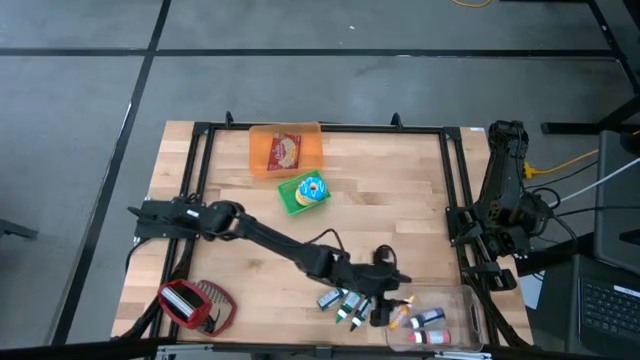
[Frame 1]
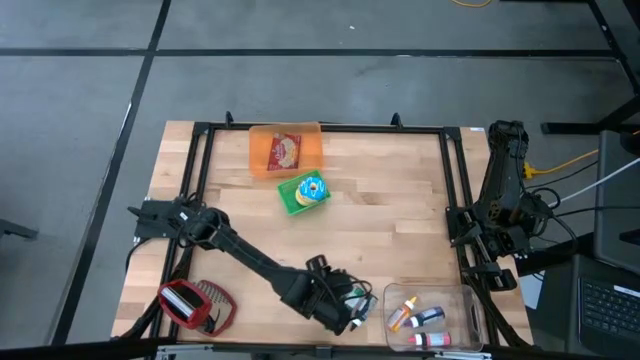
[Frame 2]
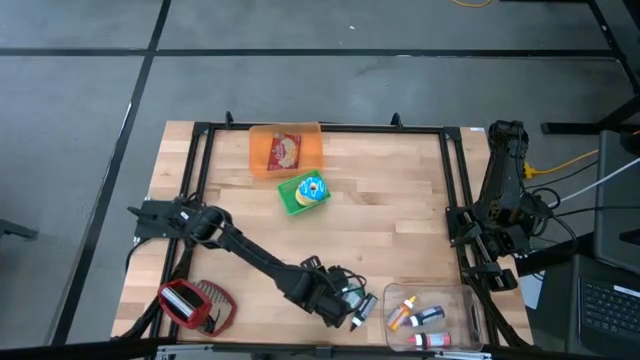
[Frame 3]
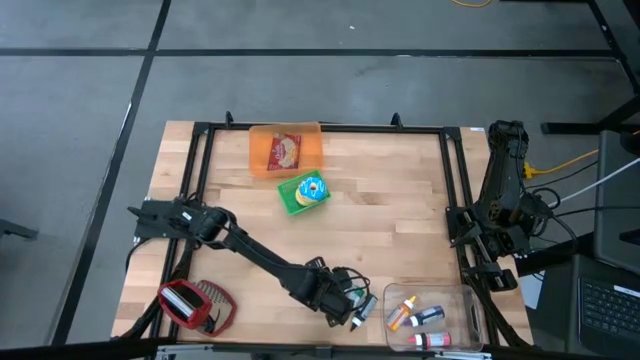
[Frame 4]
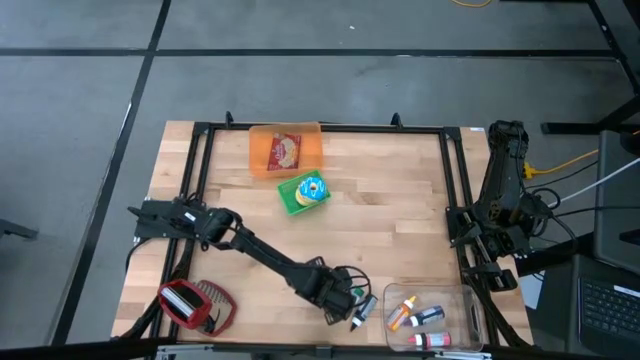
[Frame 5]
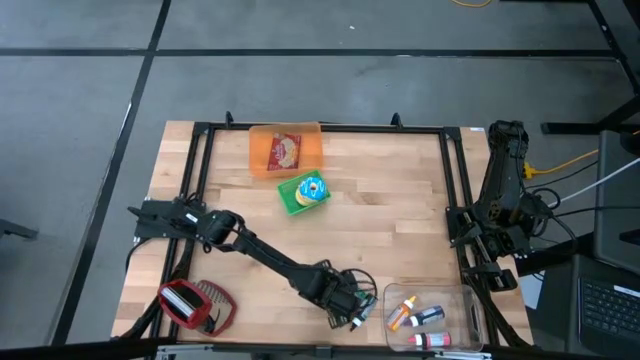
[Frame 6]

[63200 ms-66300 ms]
Put the left green food coloring into the transparent bin

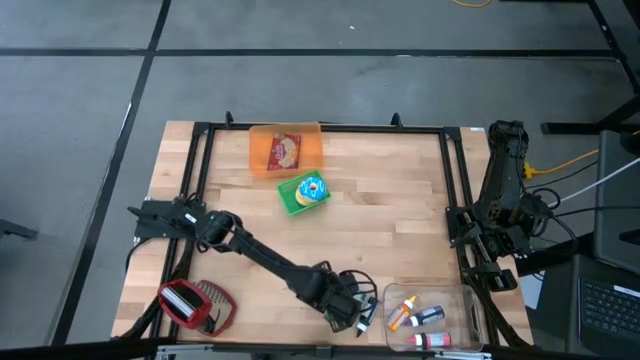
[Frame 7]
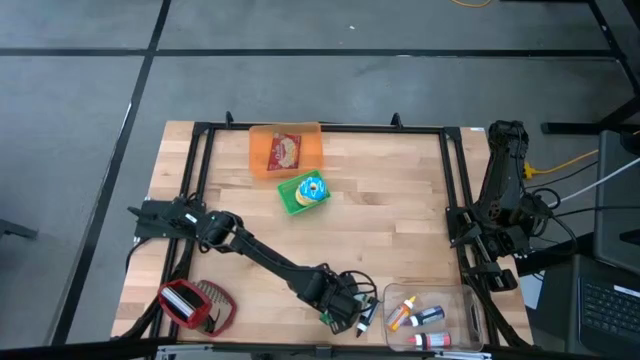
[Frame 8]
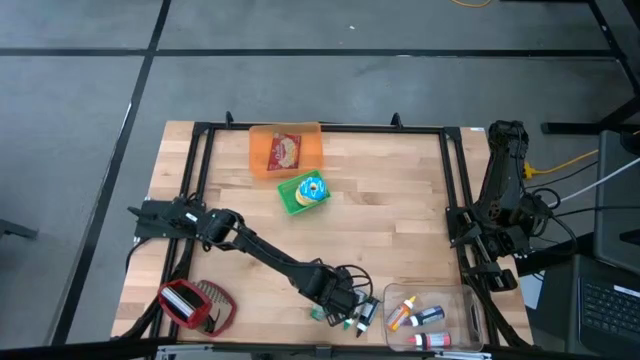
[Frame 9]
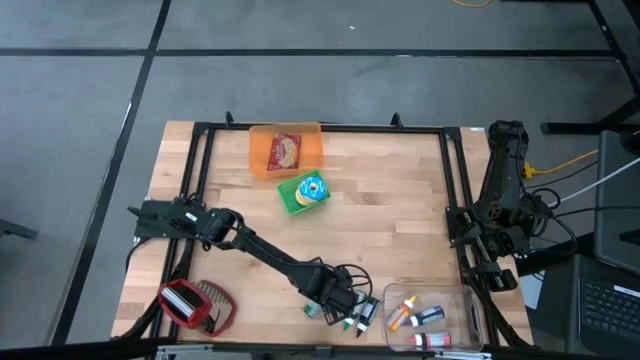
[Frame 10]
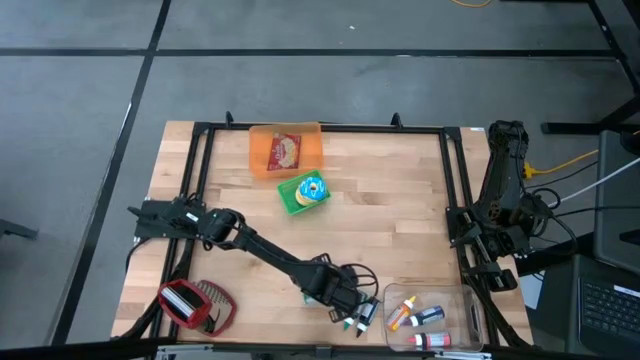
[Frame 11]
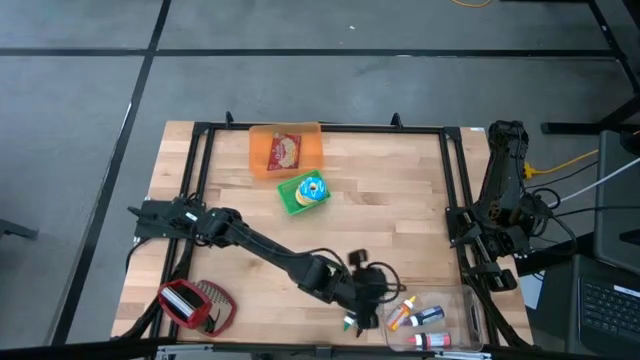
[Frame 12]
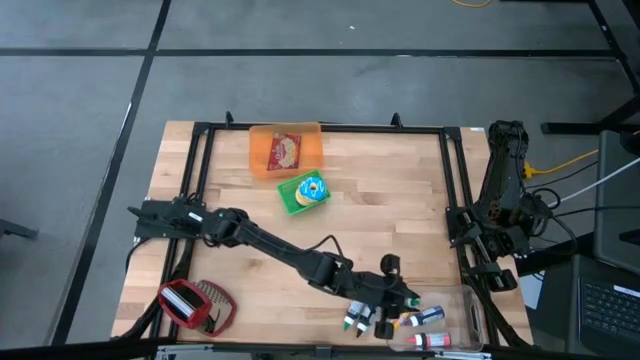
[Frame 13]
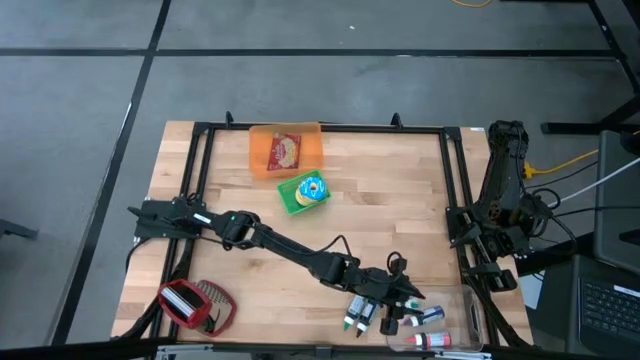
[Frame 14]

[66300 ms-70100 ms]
Put the left green food coloring into the transparent bin

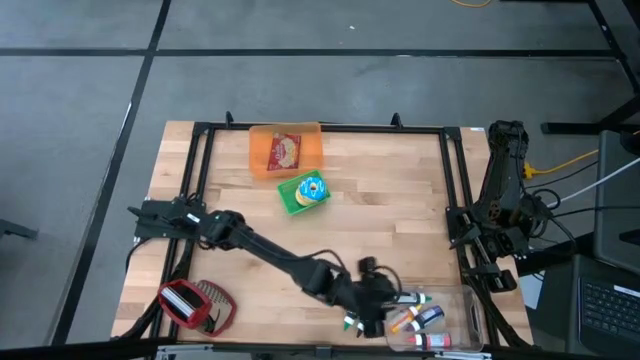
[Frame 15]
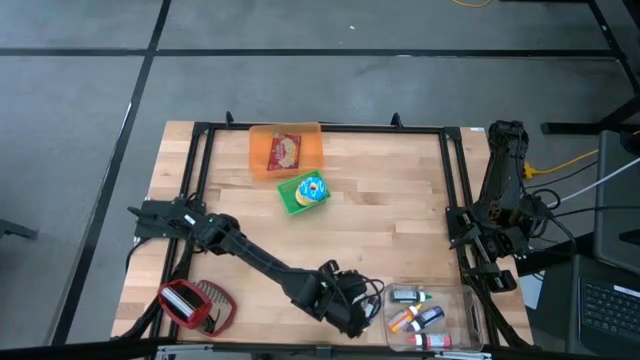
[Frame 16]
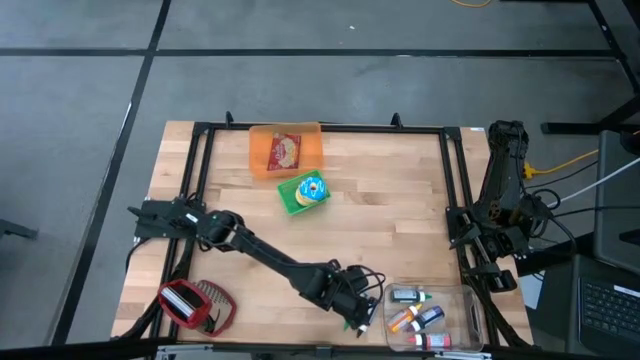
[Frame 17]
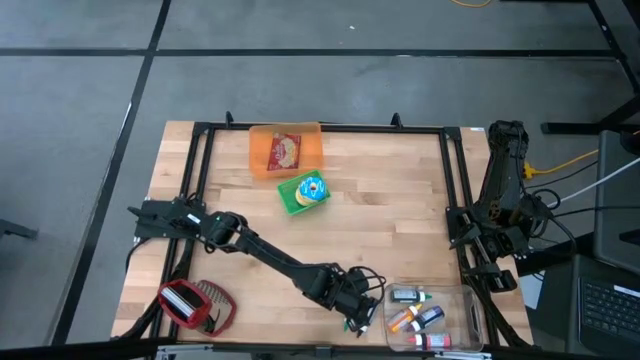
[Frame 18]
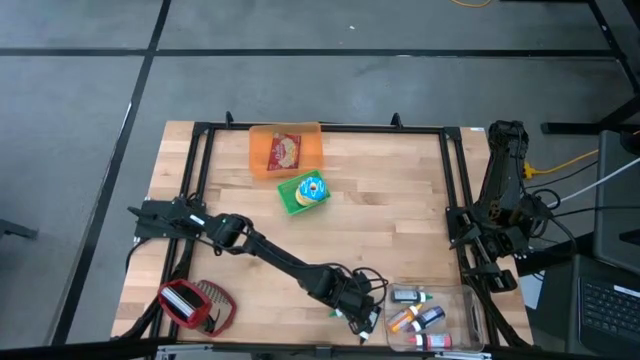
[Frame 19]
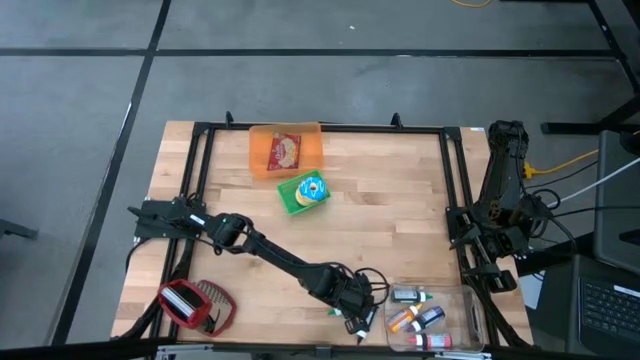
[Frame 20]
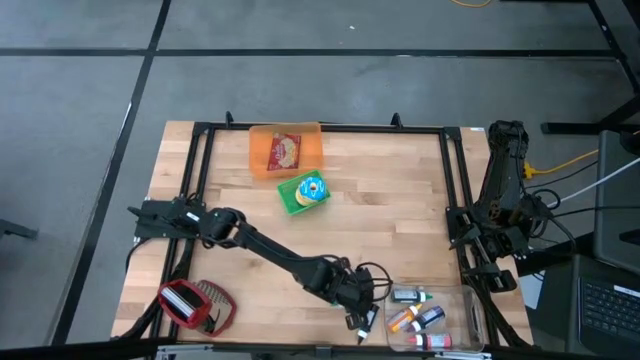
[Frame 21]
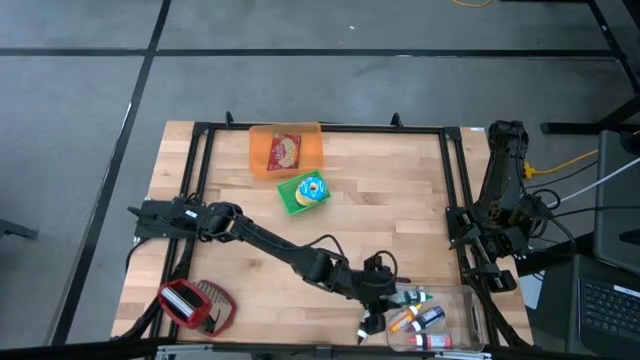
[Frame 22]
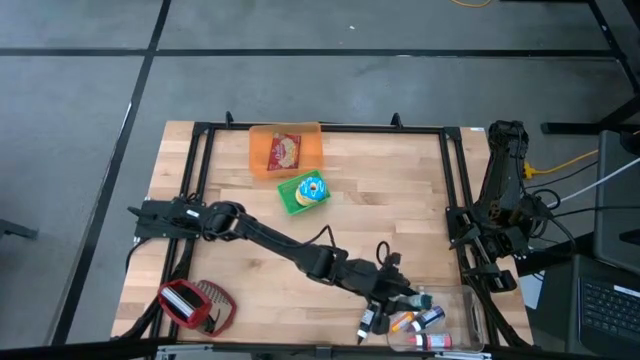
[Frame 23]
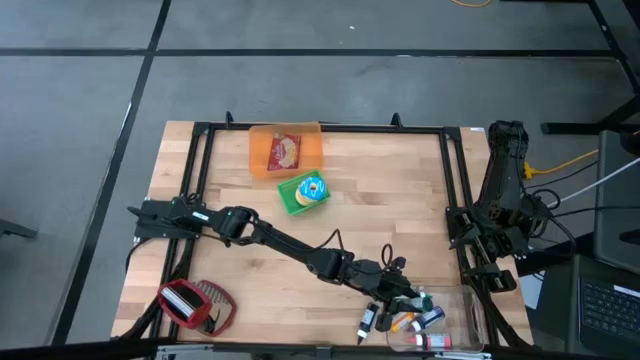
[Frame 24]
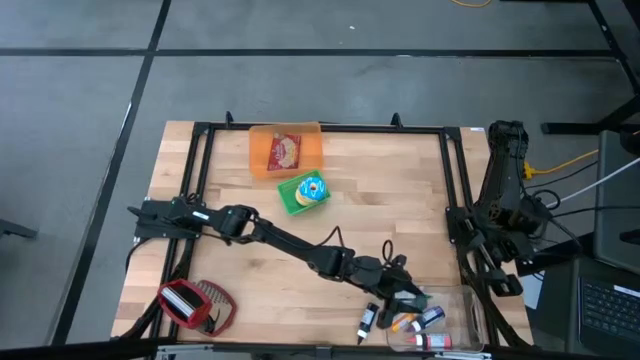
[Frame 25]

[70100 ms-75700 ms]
Put the green food coloring into the transparent bin

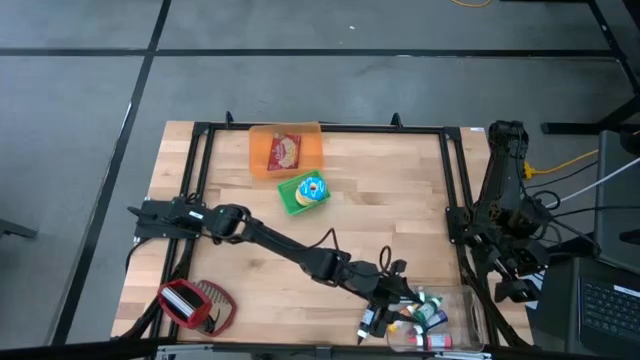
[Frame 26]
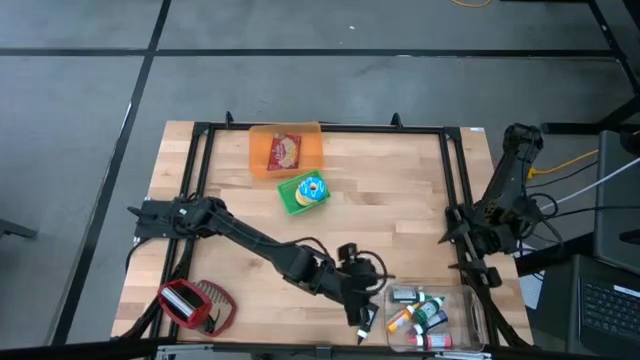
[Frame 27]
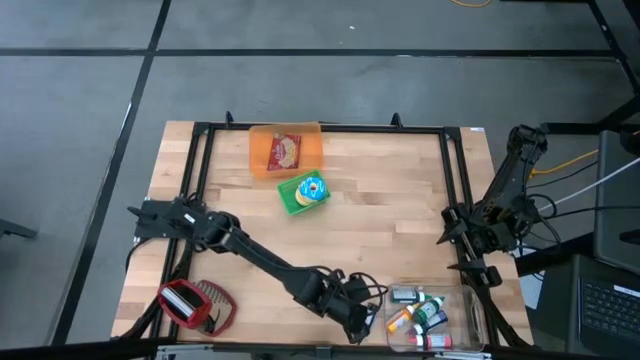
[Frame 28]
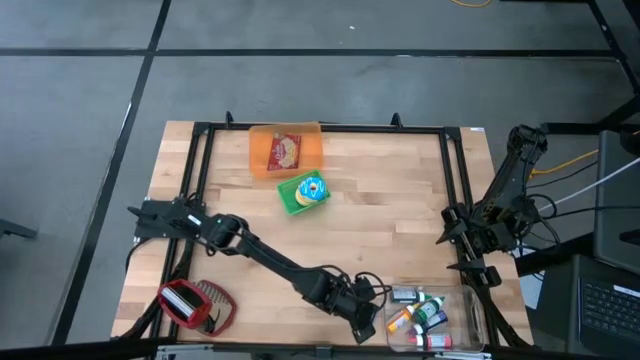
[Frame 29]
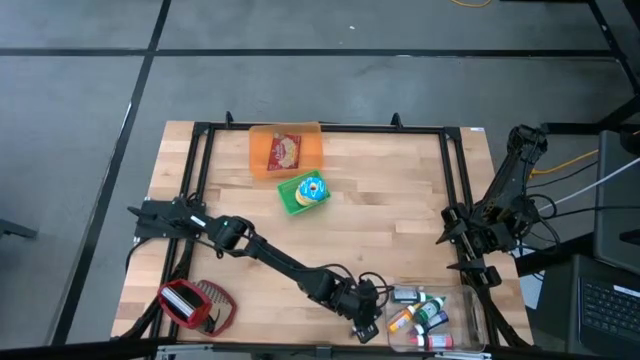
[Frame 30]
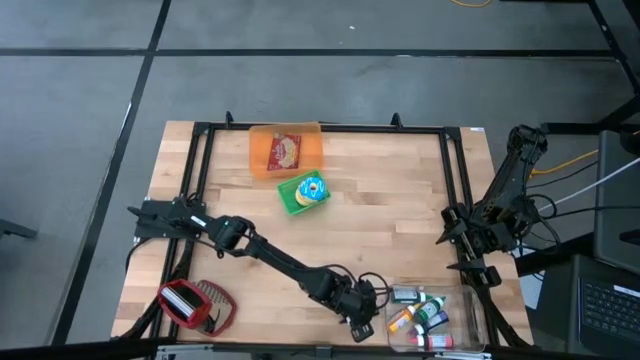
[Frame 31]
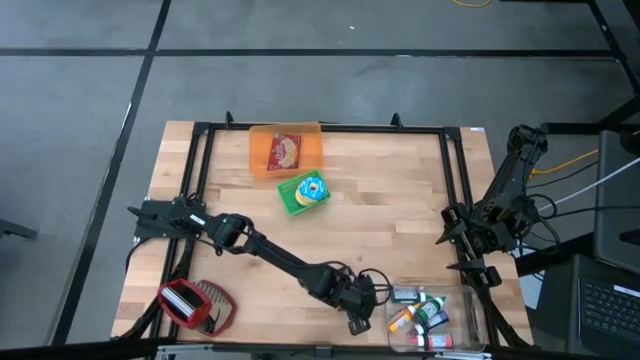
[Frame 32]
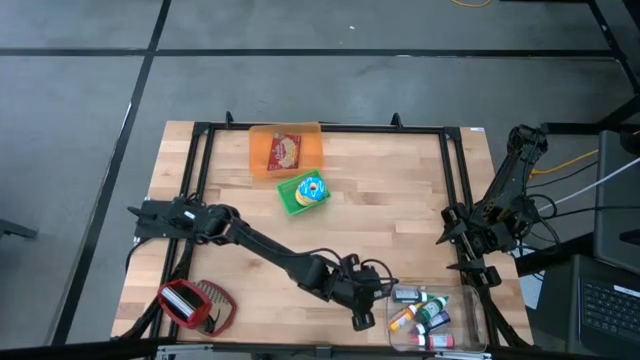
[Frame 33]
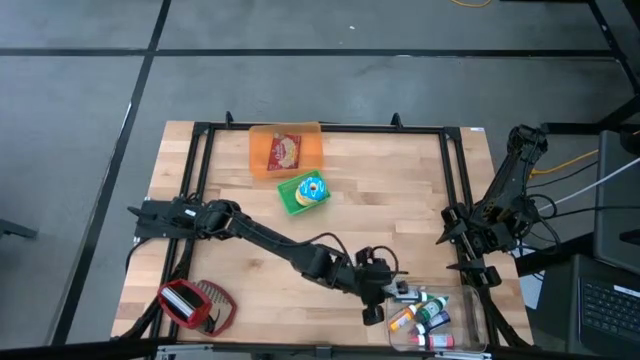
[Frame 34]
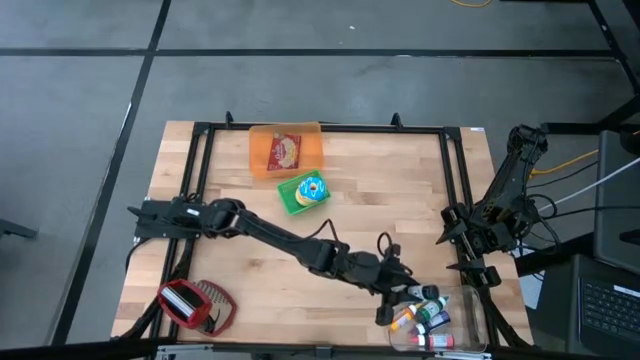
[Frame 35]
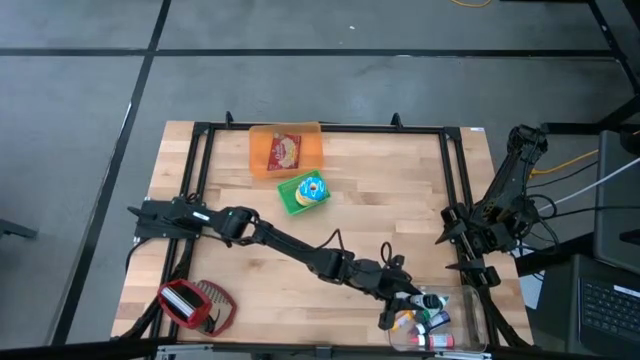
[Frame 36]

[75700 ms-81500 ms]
Put the black food coloring into the transparent bin
